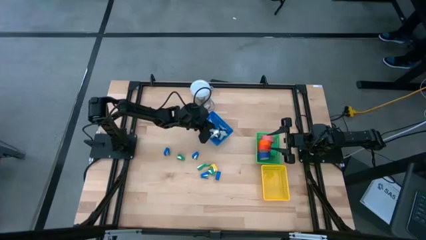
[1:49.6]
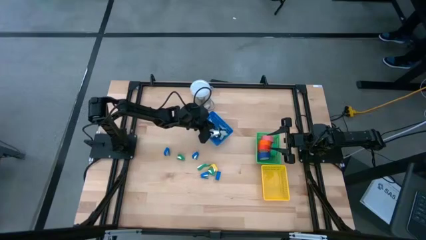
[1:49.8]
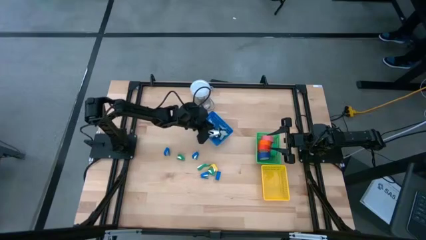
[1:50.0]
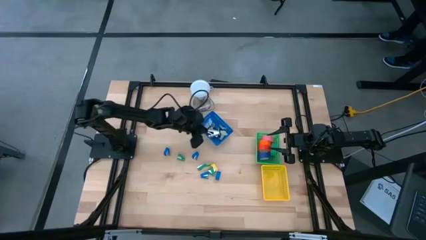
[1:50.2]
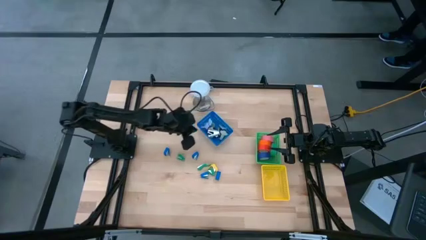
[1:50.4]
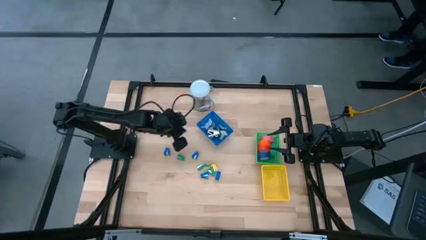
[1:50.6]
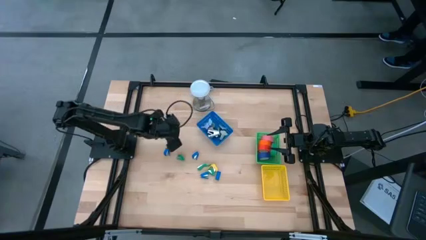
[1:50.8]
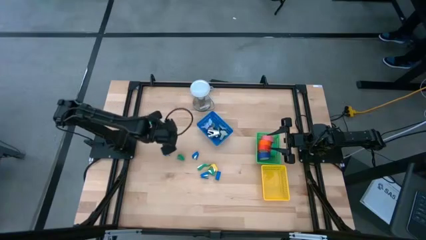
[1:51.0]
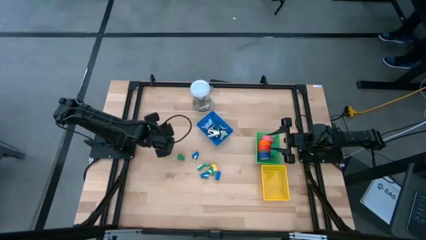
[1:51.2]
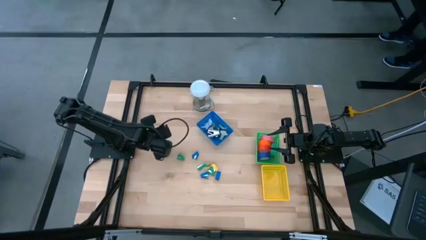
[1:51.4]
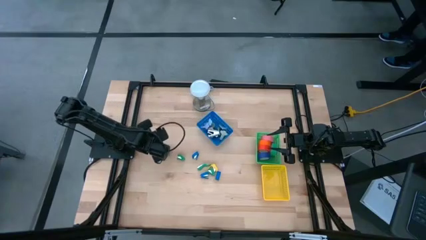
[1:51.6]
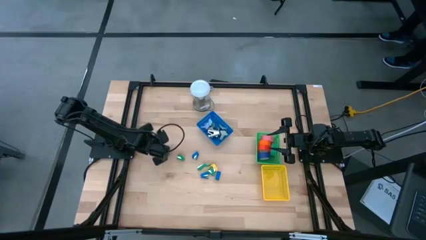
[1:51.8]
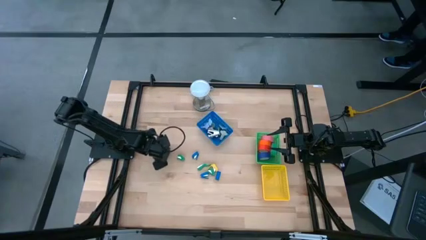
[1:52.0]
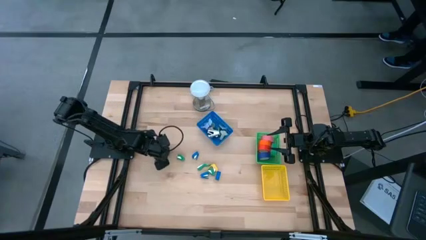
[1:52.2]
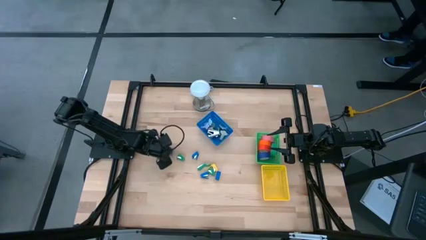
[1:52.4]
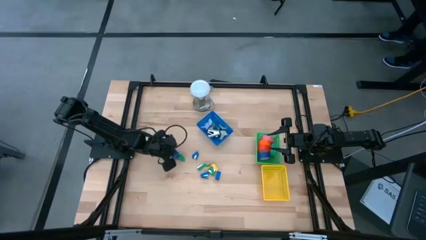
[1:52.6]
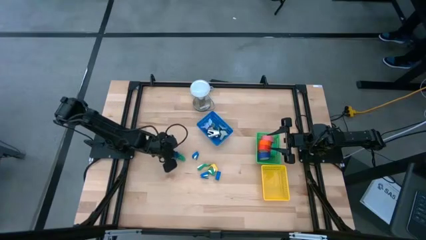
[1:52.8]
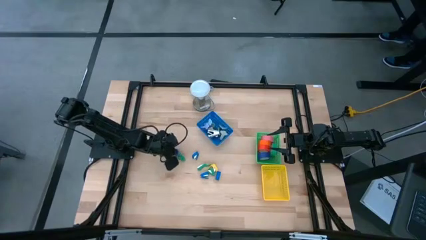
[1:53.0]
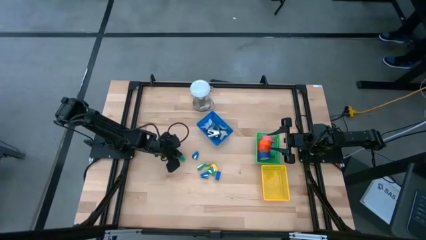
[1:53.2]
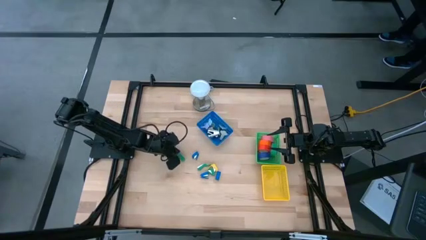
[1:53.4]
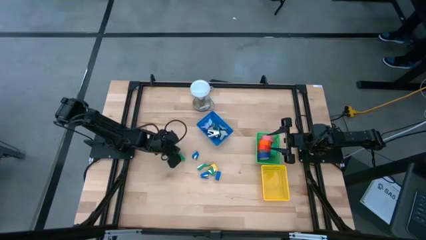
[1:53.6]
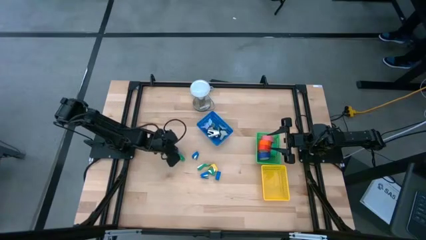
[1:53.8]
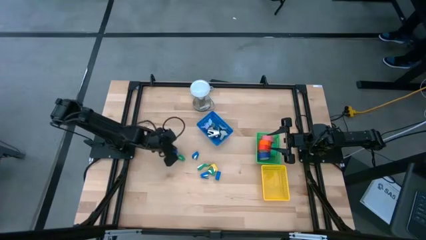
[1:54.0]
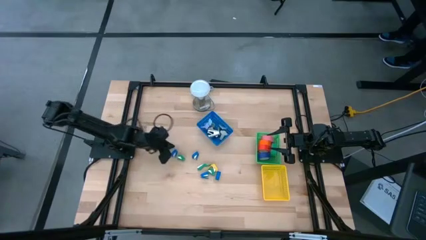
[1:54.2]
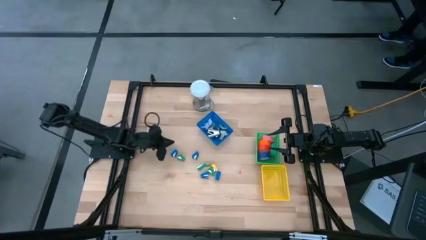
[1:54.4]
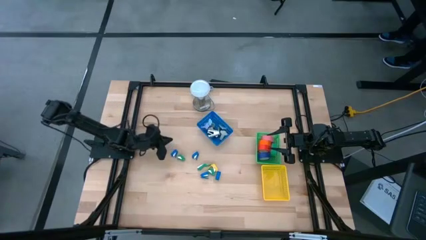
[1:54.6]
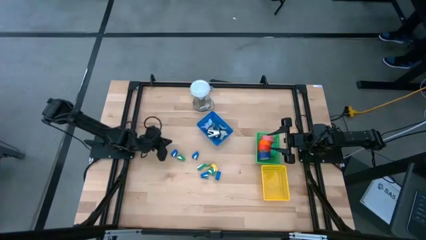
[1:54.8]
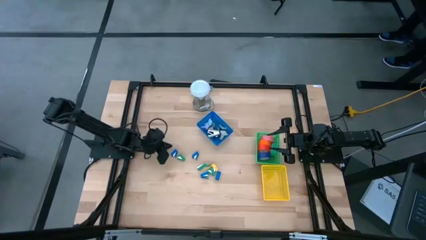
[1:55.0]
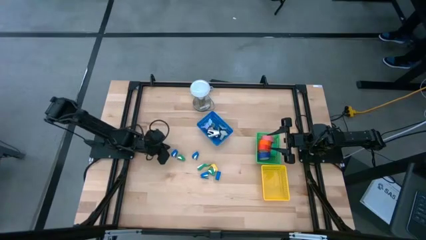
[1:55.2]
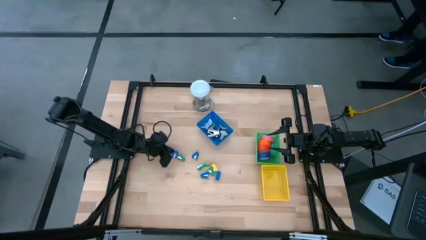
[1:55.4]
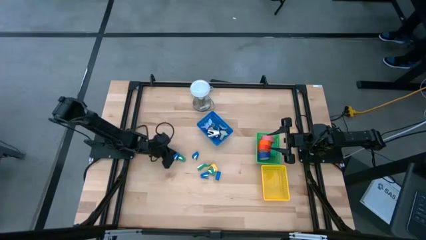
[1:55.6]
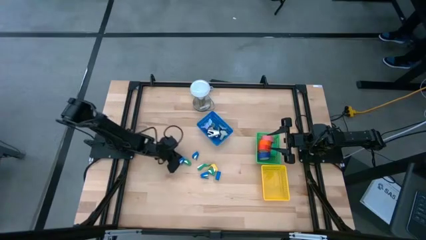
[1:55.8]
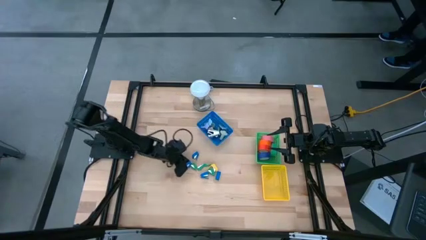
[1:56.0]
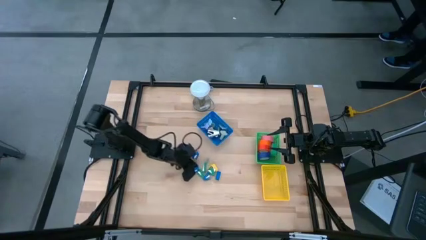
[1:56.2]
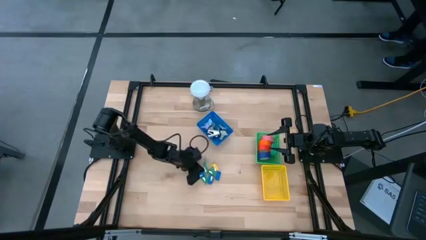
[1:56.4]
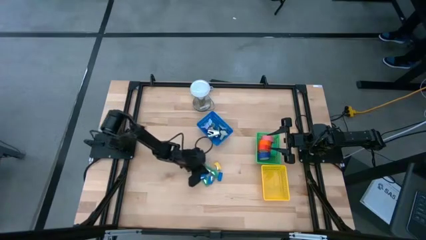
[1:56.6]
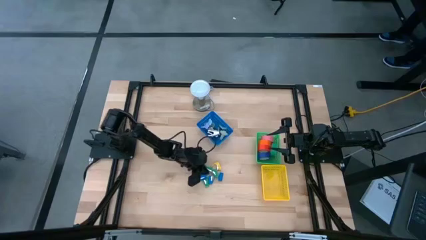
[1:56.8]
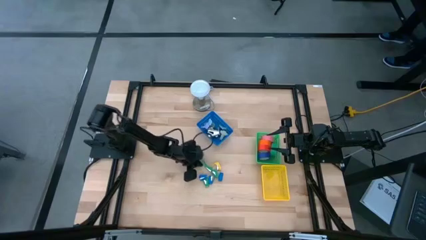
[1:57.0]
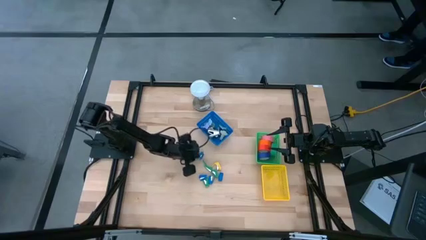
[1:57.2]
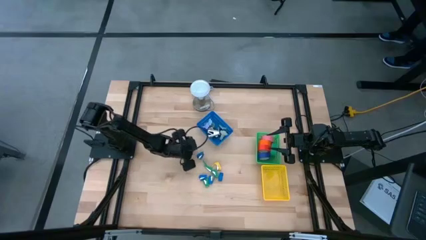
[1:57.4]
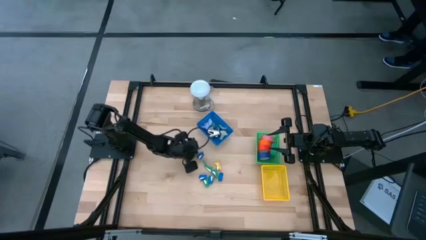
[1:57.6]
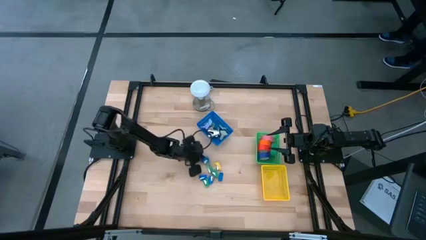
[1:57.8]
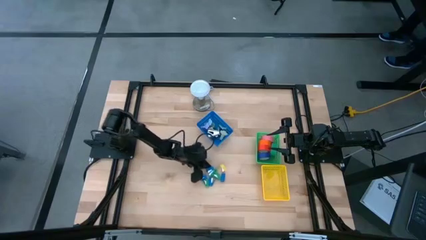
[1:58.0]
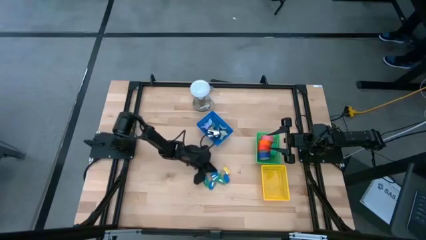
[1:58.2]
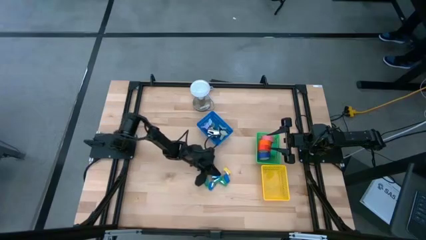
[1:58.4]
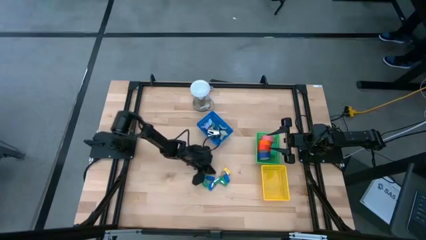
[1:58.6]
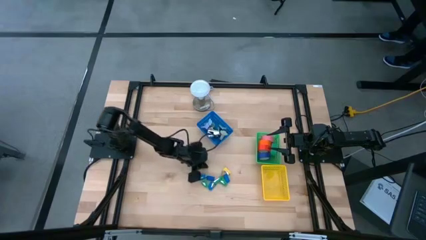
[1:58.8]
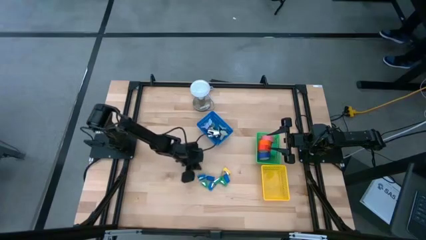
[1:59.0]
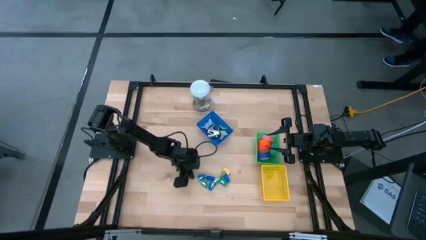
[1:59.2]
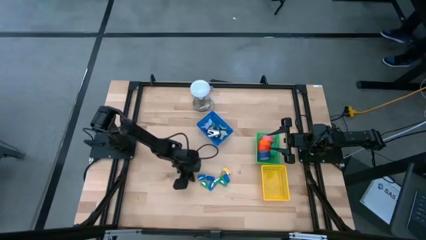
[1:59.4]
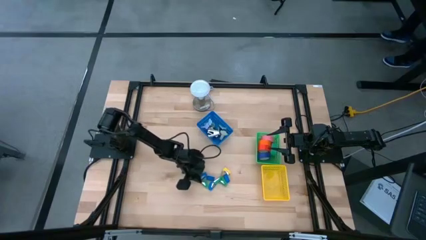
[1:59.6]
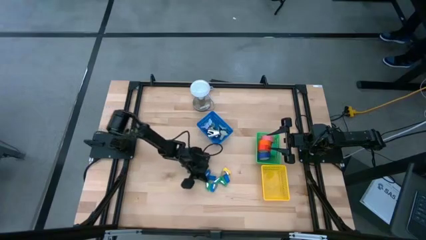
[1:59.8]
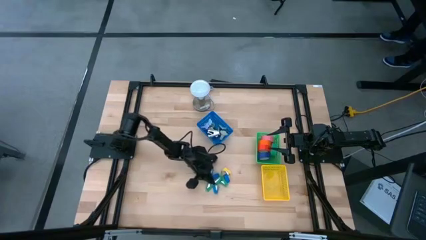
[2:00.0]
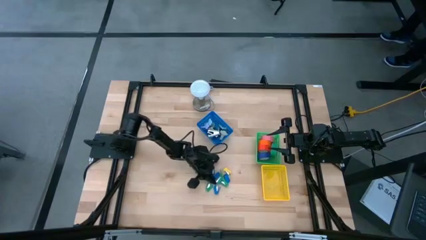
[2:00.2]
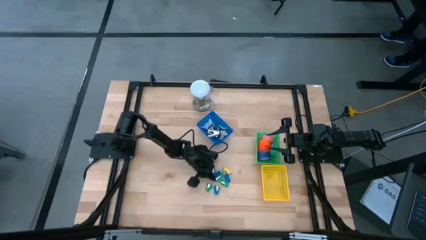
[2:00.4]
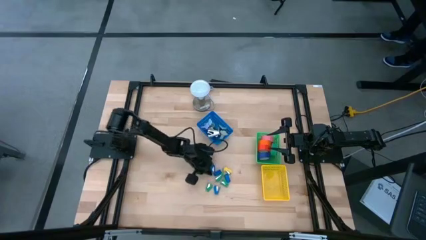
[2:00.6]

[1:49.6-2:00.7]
Task: Pick and place Stapler, Stapler remover, tape
Move the staplers to the center of the table

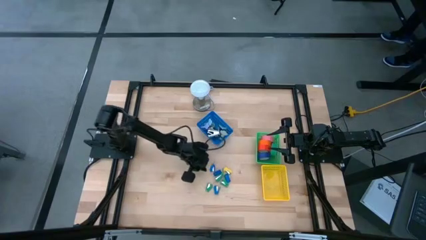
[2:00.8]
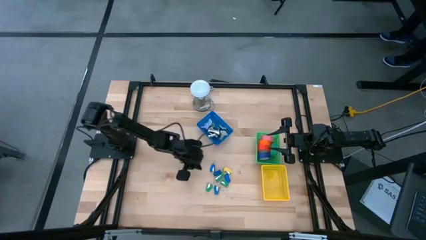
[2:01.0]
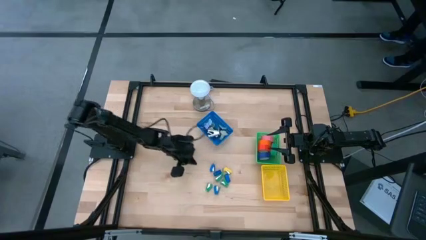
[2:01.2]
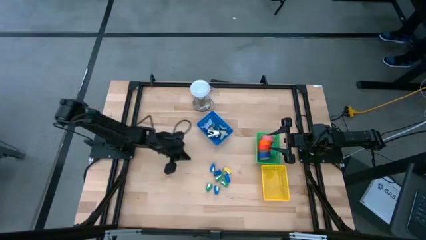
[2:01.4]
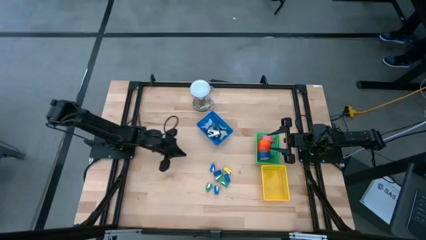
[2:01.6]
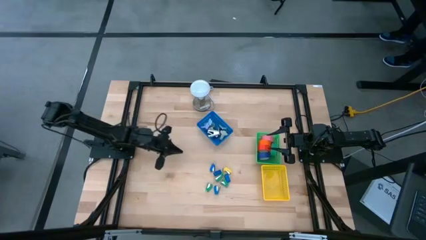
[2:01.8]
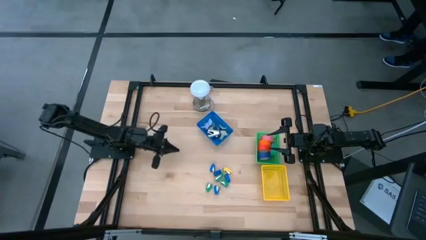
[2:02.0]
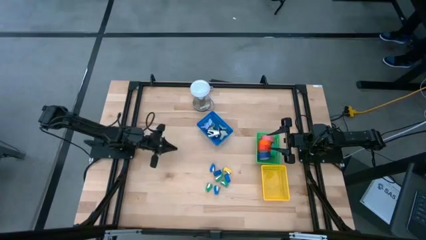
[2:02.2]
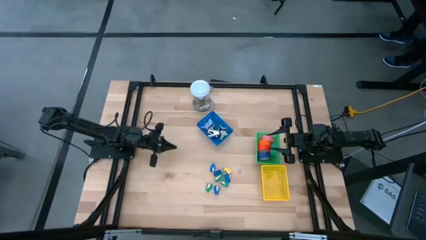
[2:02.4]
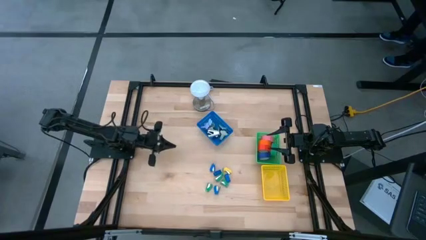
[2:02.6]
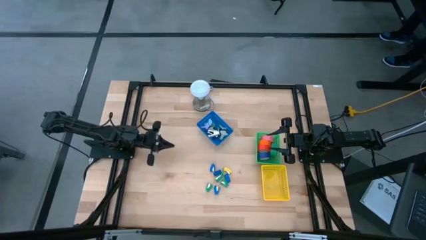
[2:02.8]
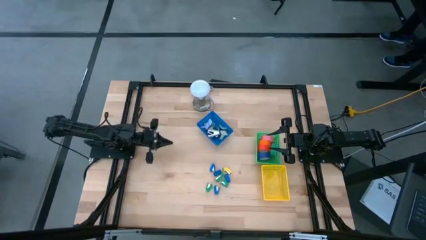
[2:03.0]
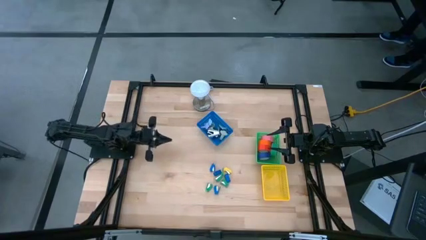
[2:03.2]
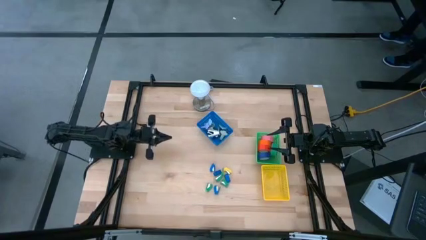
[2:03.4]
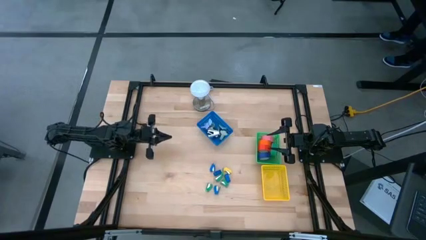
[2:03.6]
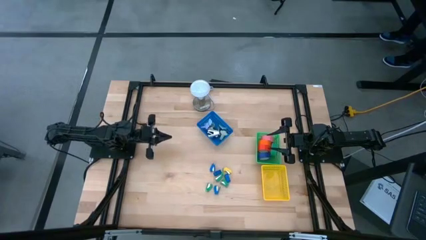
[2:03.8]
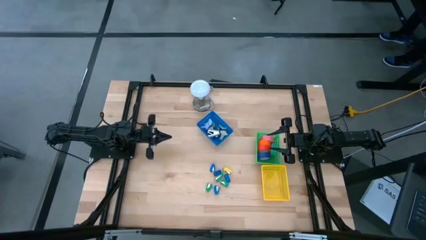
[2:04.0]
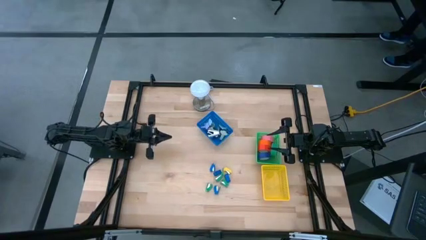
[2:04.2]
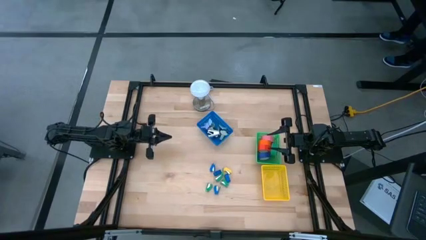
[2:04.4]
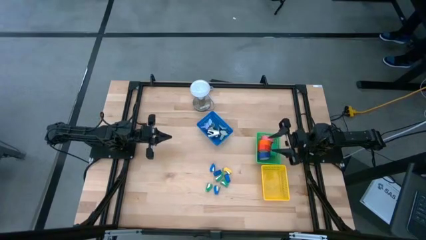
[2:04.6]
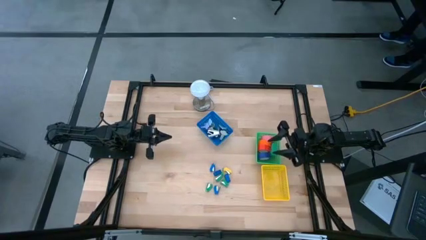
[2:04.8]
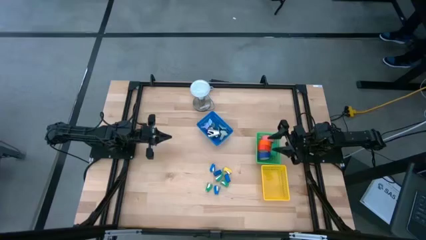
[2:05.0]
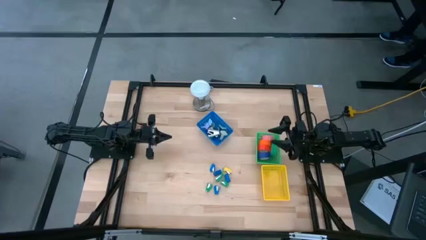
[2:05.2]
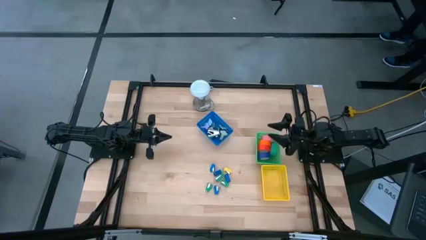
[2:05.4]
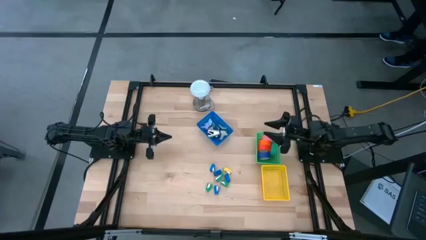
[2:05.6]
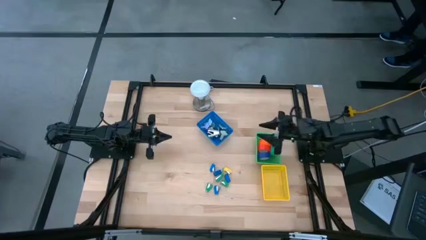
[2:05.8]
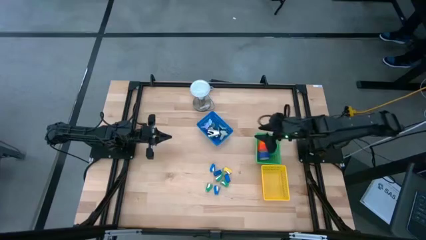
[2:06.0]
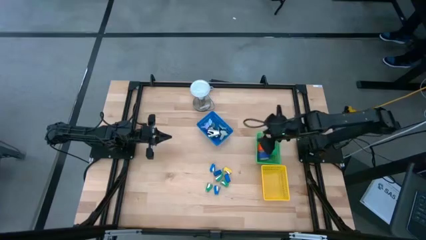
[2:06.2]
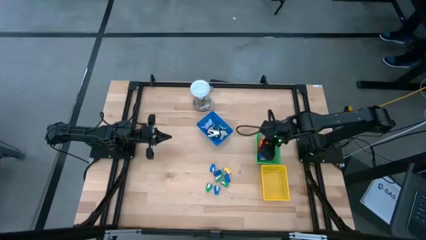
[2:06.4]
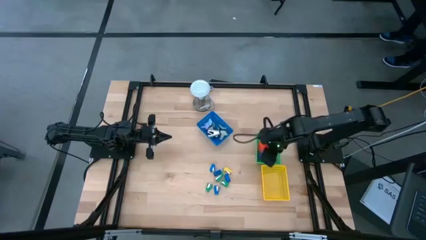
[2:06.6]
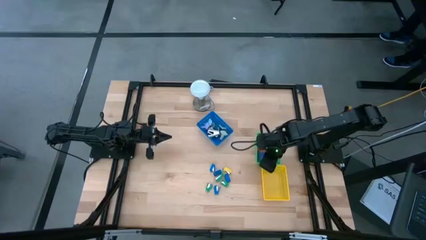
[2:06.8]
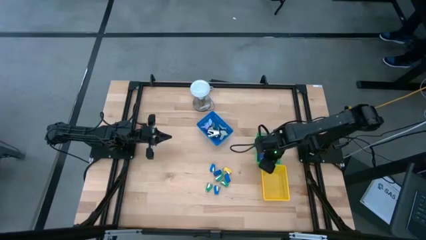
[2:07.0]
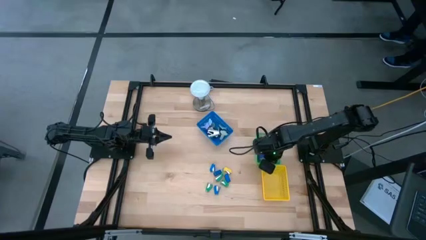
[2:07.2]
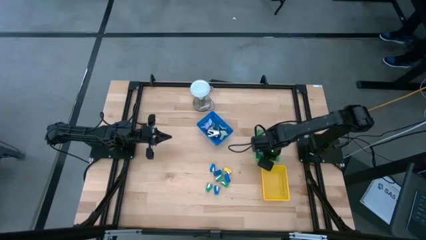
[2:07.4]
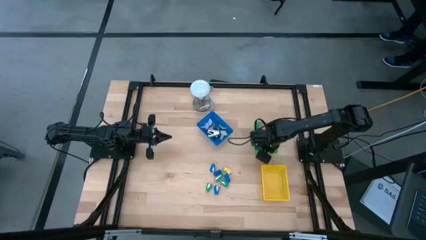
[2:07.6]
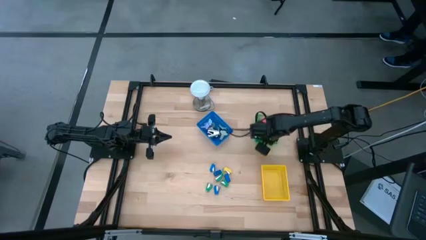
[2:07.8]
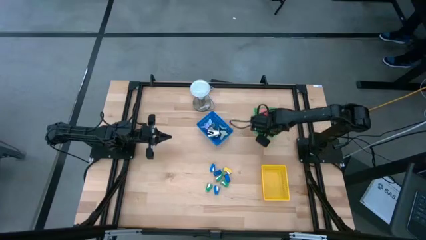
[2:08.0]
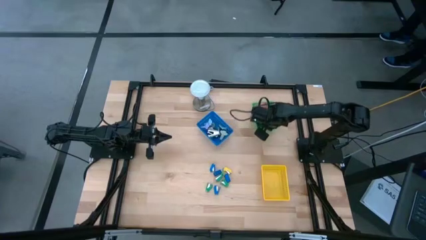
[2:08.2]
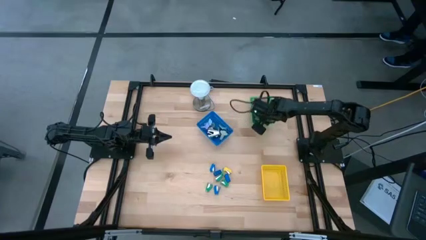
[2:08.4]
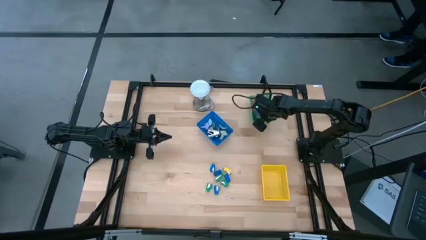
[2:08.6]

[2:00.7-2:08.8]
Move the green bin to the top of the table
